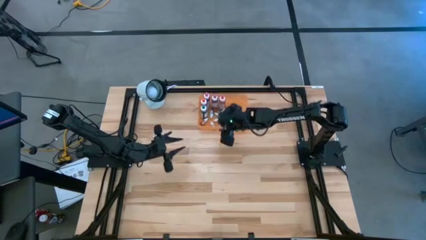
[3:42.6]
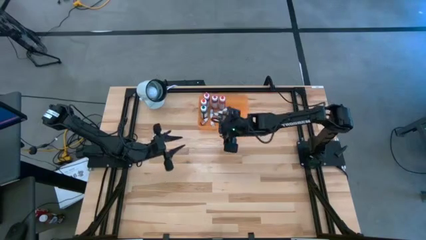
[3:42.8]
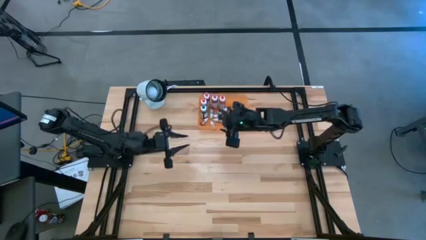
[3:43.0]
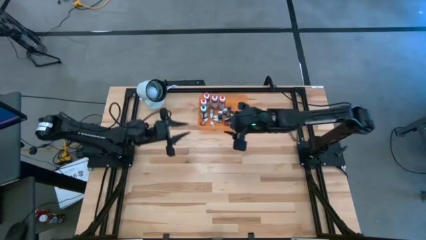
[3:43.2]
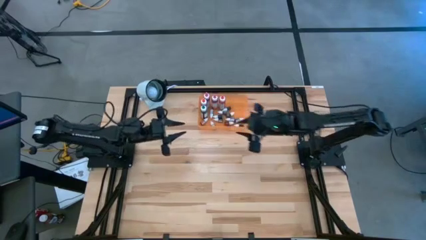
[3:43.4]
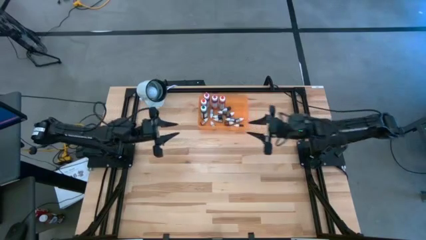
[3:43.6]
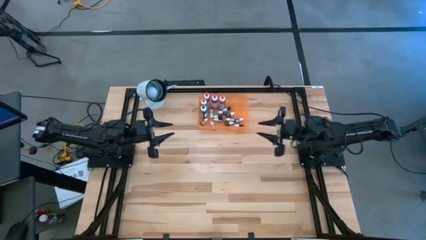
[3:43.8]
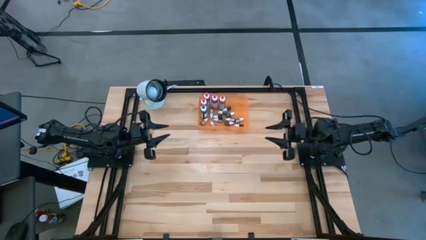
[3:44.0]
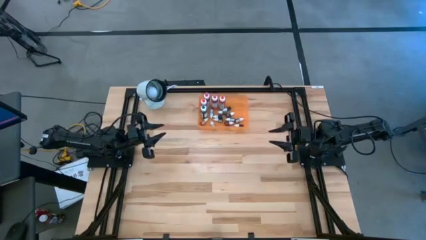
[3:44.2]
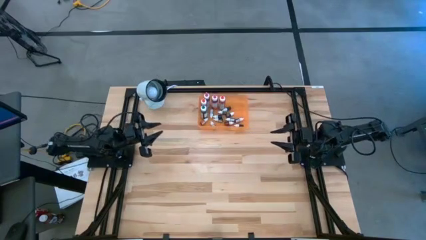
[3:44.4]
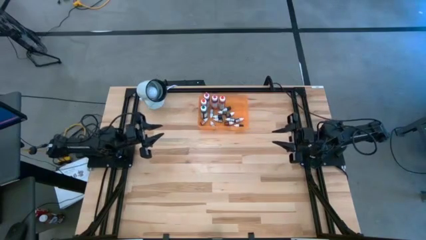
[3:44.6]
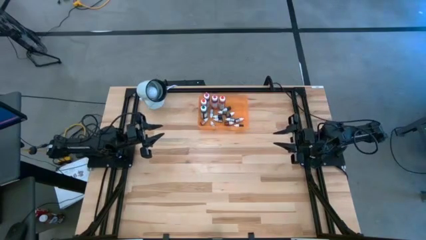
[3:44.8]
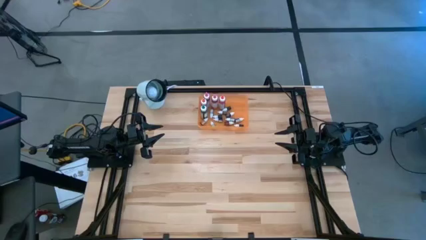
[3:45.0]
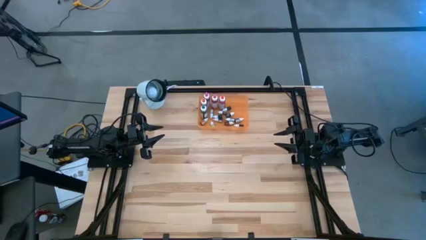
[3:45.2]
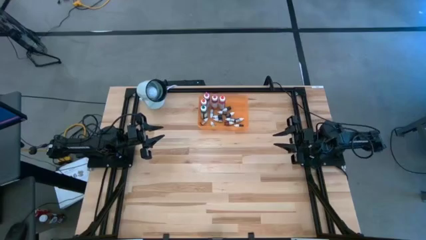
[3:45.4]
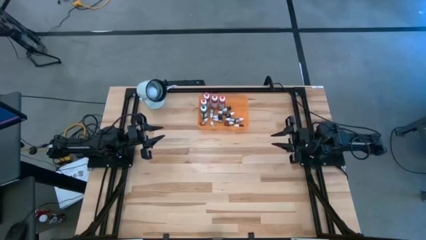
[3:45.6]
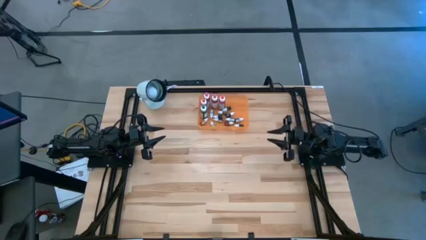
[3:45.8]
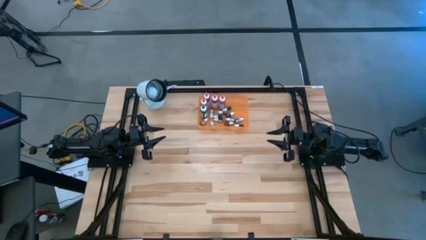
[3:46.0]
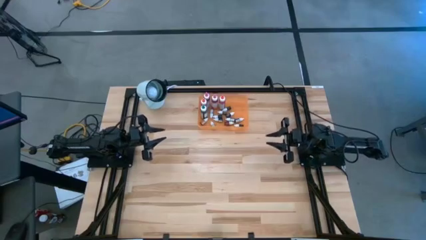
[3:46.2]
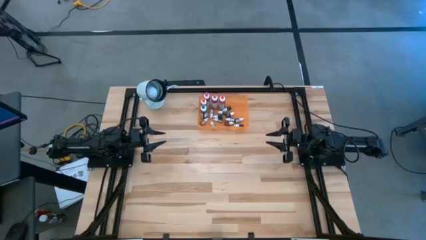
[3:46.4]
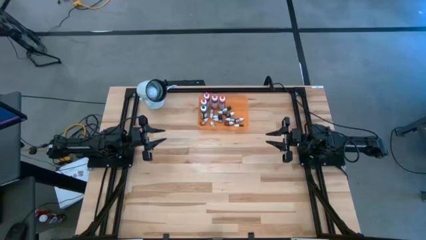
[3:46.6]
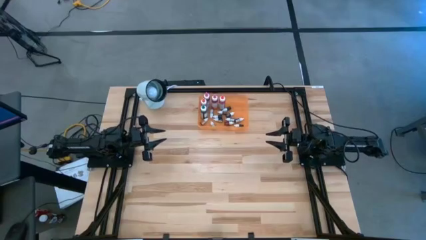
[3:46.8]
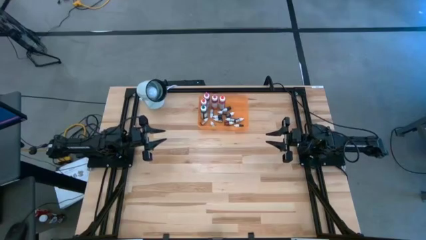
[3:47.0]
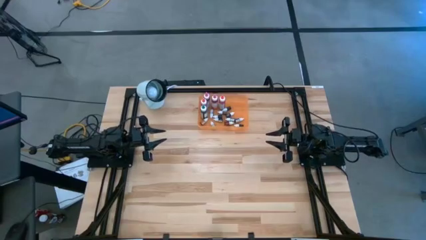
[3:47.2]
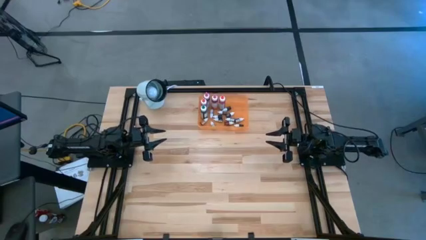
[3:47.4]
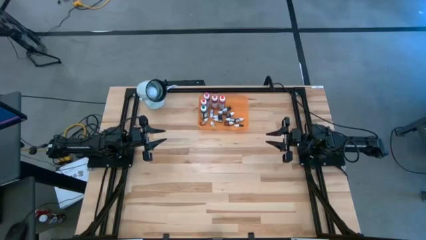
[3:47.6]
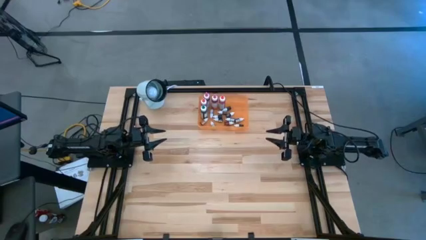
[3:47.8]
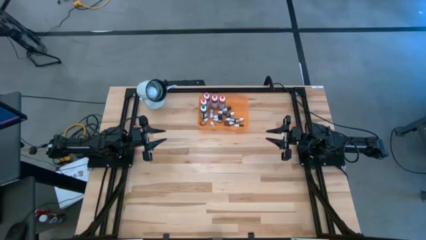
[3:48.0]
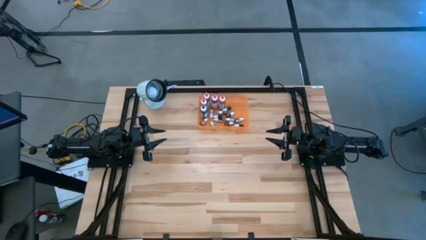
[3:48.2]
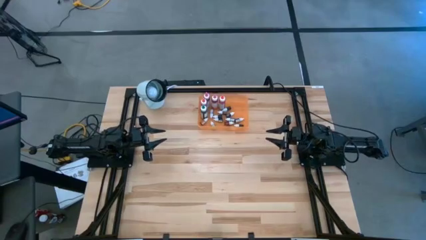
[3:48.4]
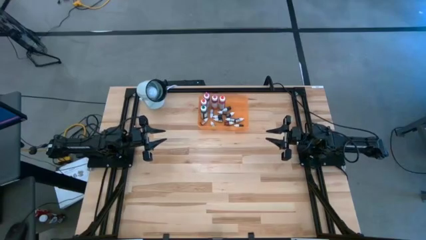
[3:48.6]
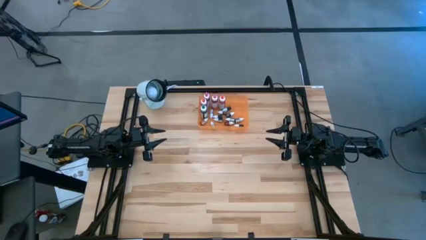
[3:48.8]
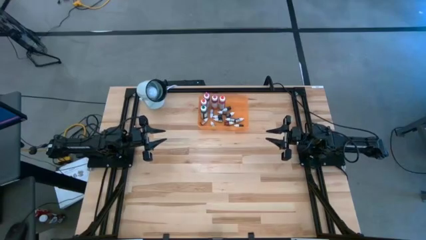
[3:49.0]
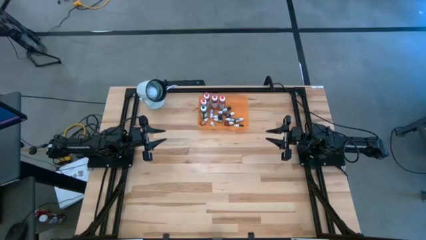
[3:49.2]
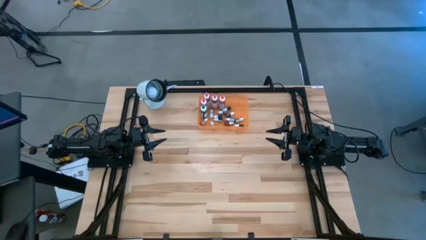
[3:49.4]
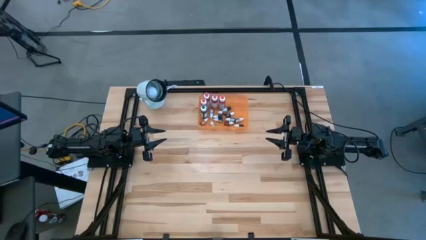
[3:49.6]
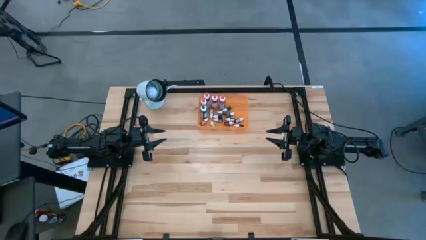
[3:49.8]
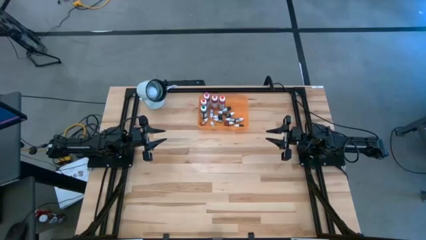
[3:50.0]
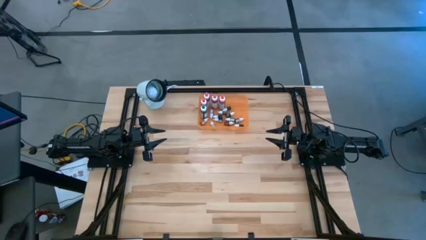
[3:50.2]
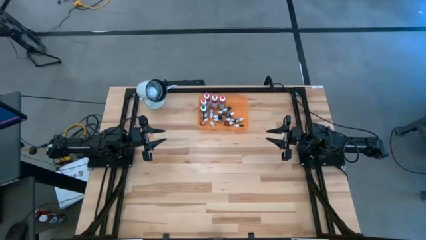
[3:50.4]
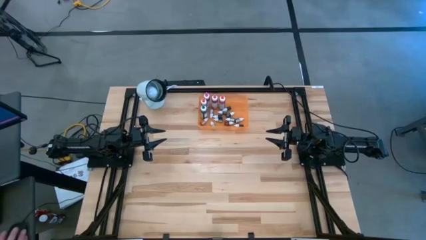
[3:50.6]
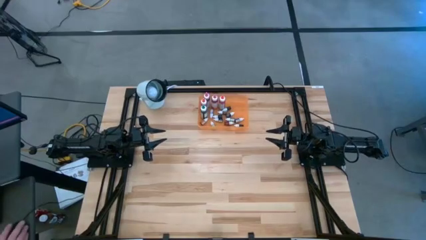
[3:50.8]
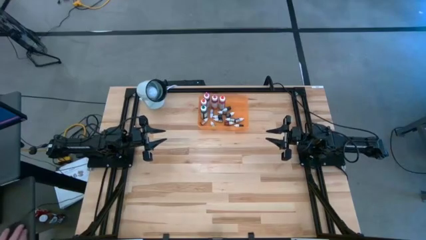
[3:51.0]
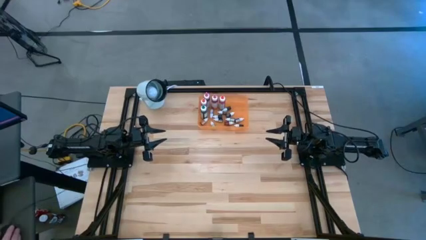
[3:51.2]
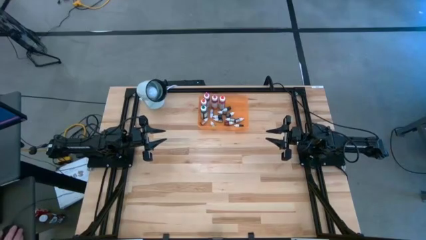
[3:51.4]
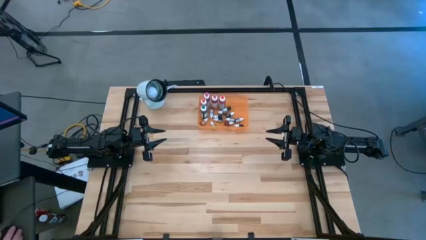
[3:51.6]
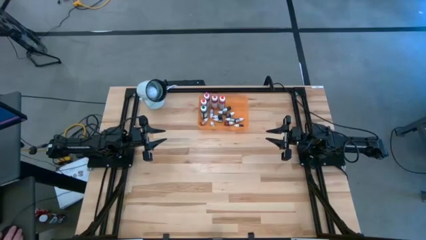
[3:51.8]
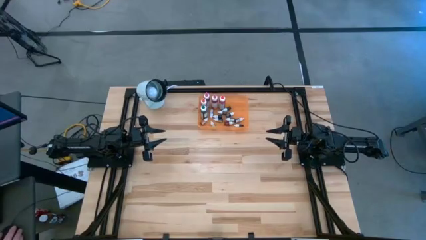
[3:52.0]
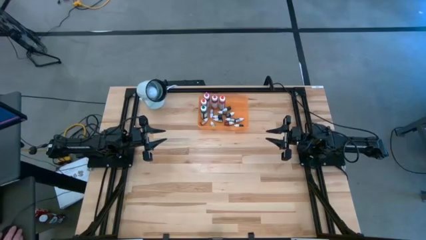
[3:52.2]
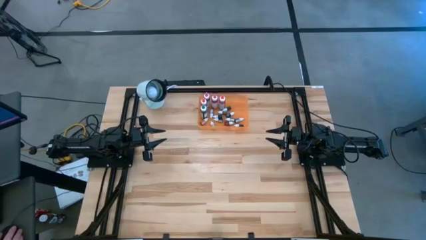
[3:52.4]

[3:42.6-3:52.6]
Task: Pick & Place food coloring
Return to Home Position

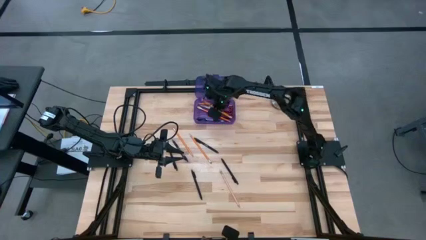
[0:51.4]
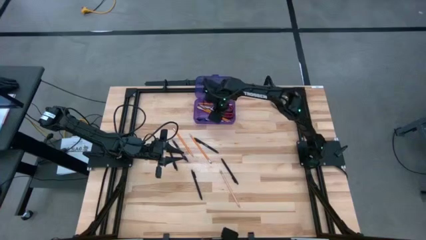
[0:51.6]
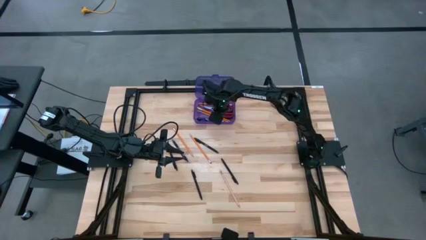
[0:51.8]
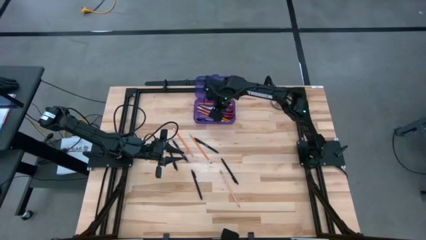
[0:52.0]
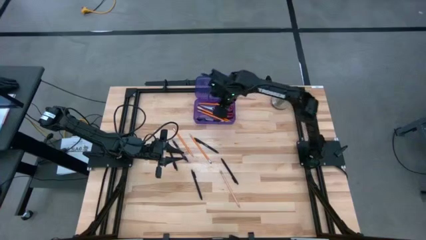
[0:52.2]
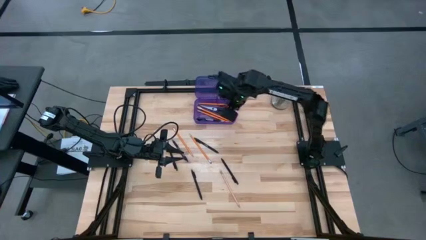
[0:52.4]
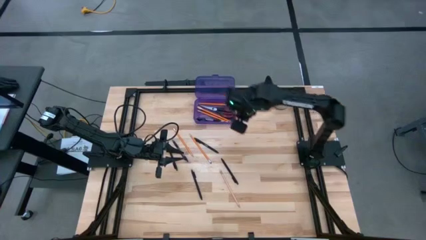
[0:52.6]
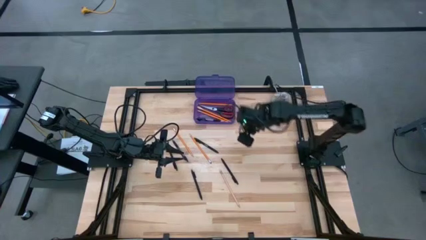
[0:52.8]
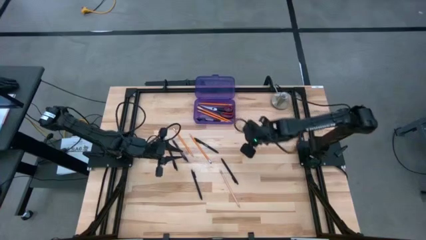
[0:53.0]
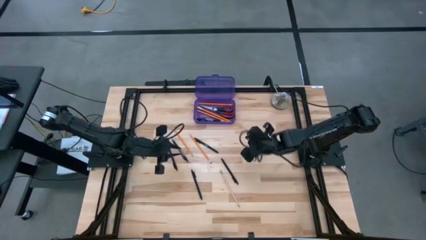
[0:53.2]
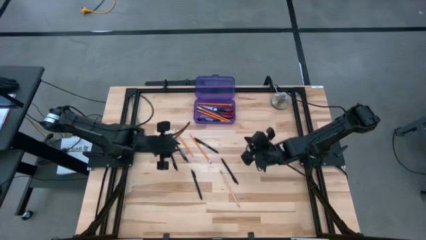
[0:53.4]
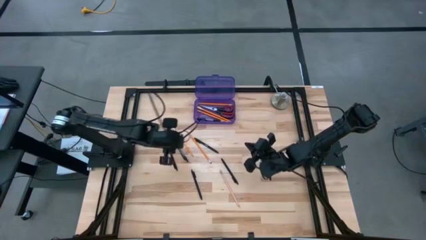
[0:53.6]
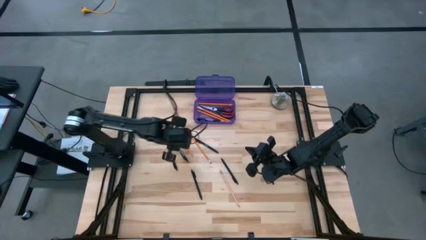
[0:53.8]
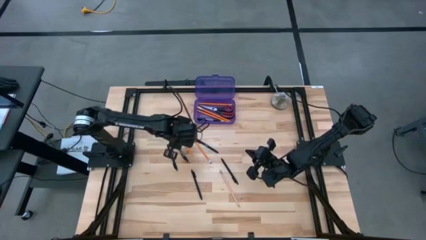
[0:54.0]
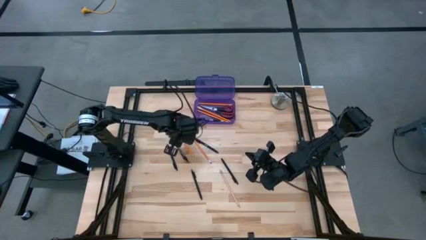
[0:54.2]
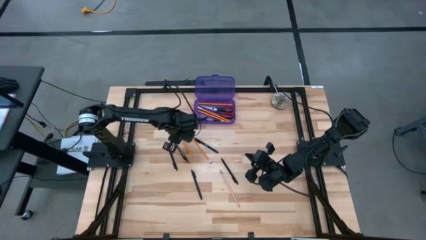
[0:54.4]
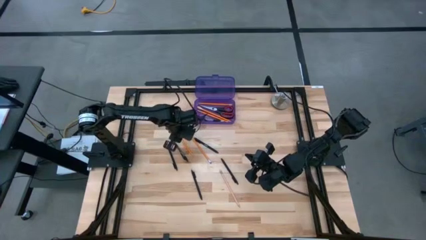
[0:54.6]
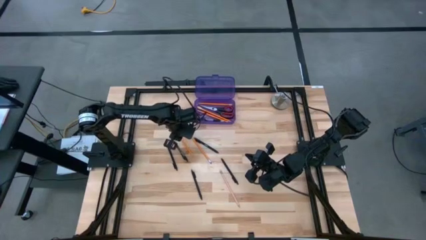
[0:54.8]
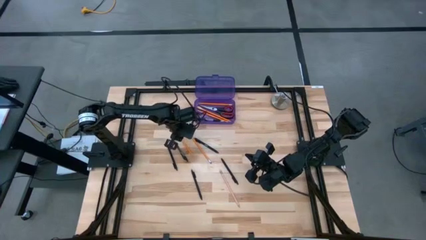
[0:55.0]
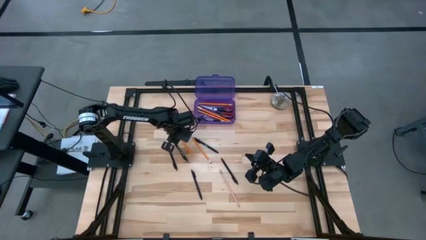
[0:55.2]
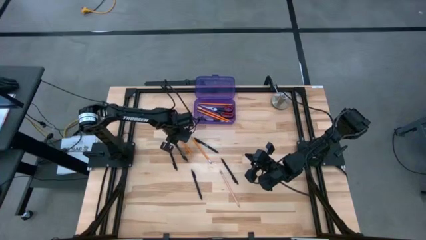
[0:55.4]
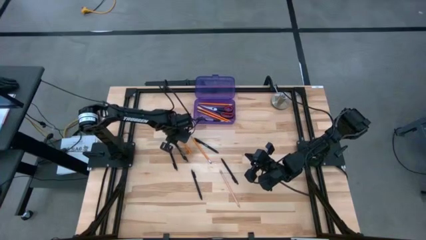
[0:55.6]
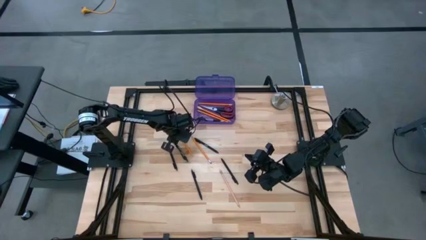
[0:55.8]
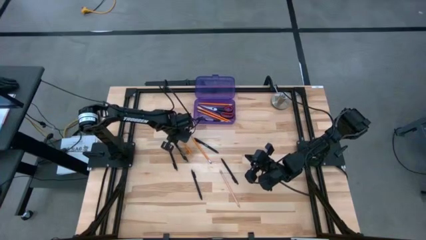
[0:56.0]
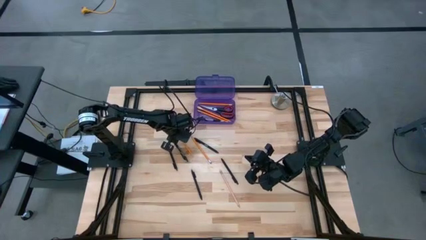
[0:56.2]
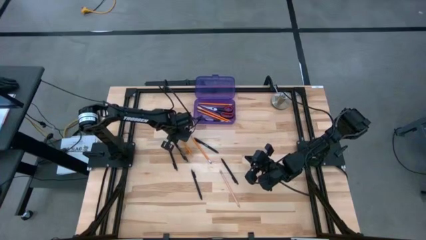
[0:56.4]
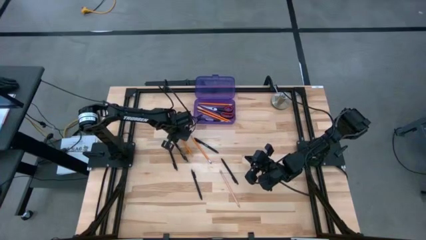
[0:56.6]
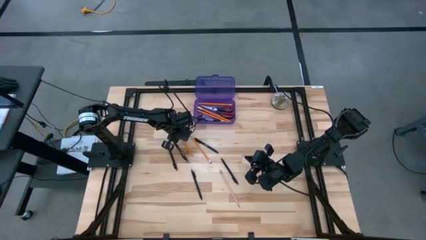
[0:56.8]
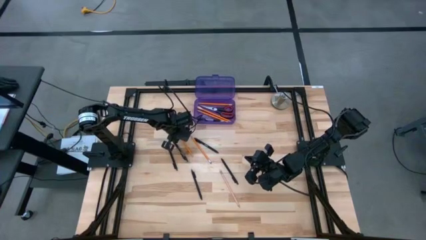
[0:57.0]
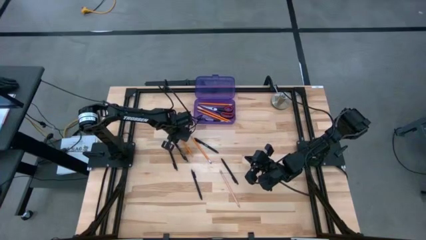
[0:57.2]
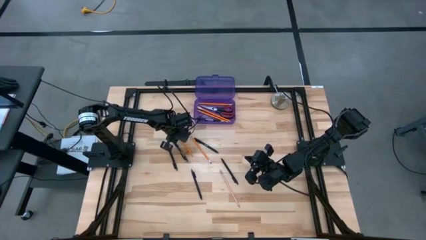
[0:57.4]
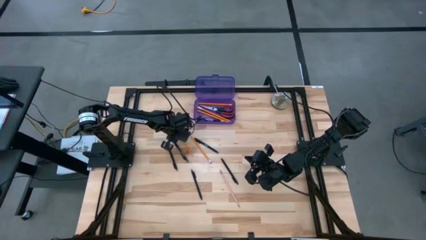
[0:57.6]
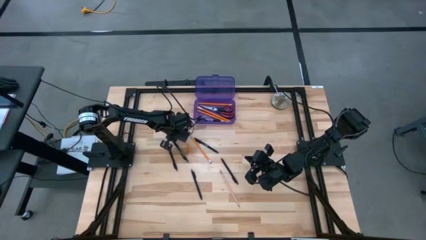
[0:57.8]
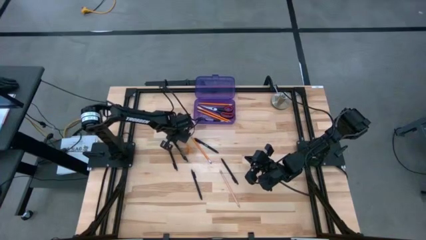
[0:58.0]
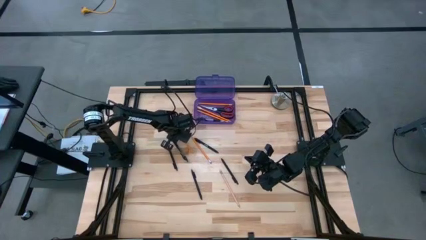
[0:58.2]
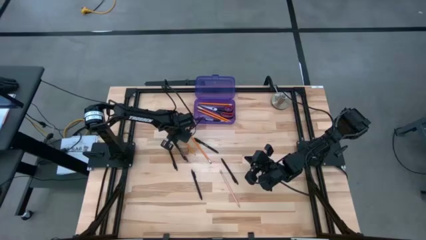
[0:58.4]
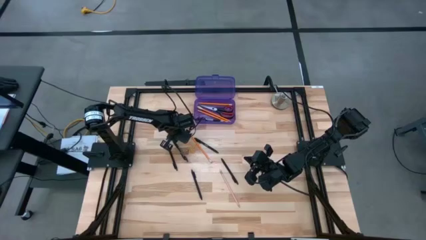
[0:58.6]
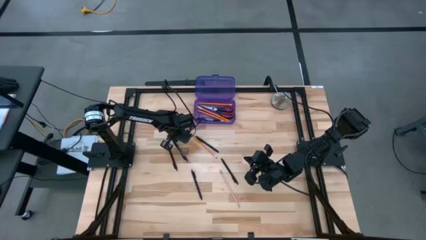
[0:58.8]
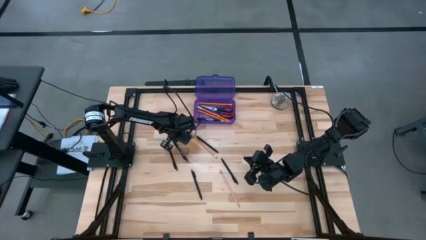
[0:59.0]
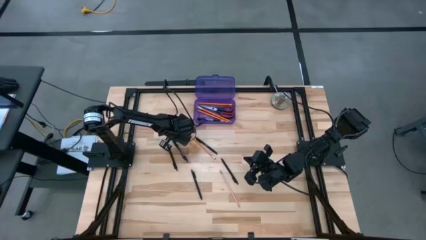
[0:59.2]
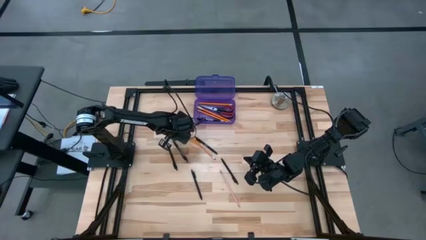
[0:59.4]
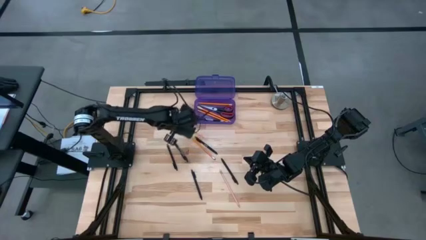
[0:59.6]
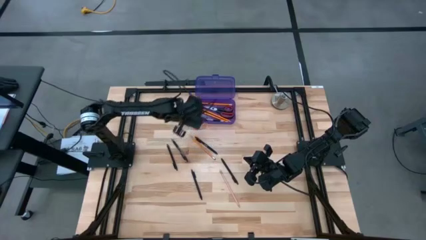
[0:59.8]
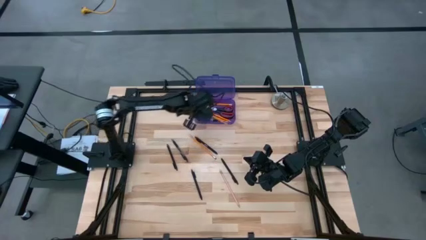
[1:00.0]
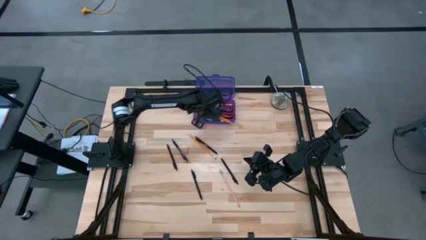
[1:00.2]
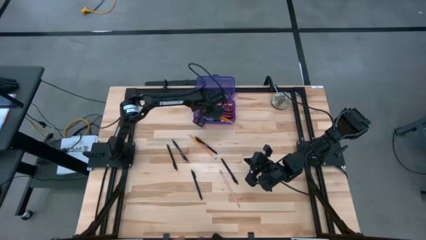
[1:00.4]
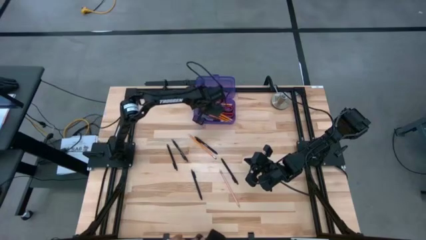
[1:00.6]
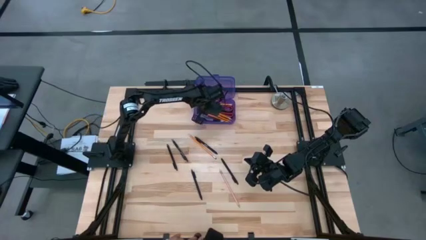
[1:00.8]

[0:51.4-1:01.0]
Task: Pick & place school supplies into a supply box
Put the yellow pencil into the violet supply box
